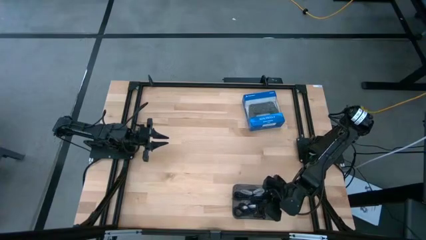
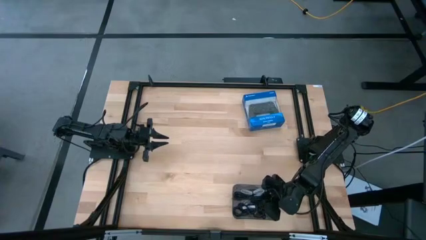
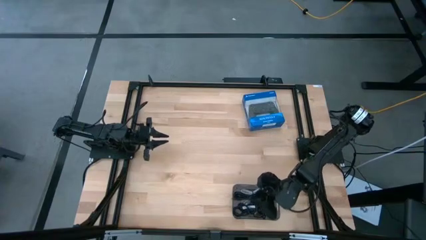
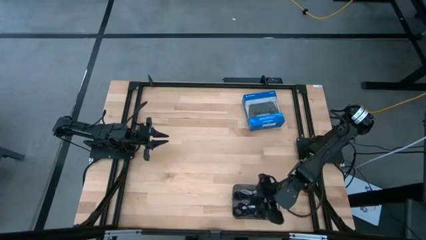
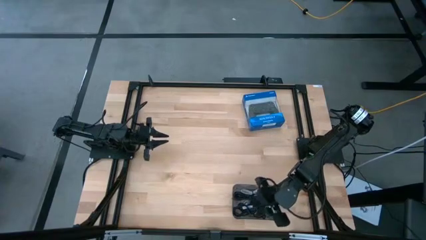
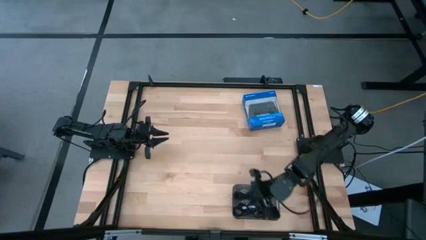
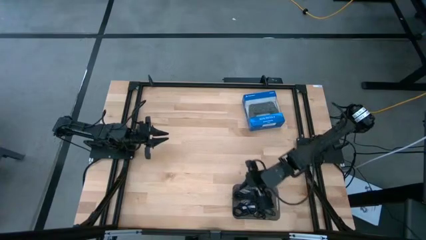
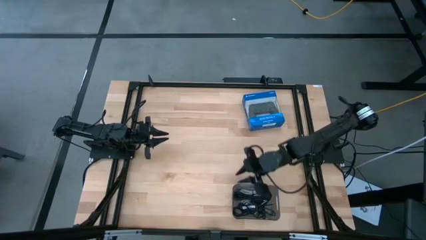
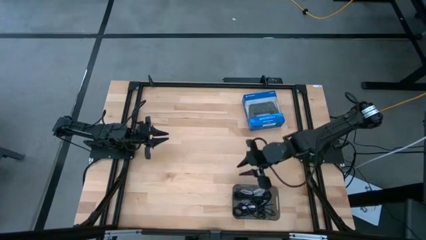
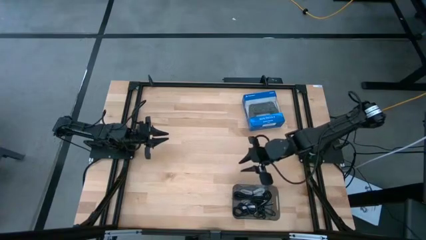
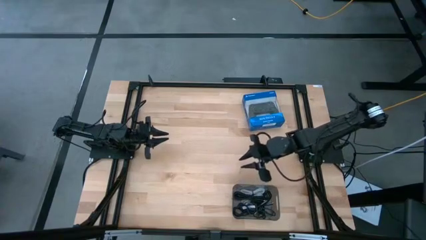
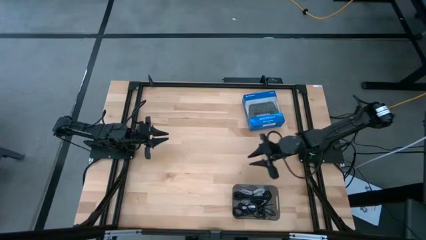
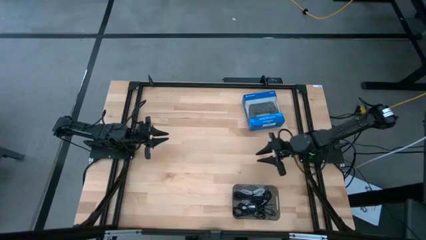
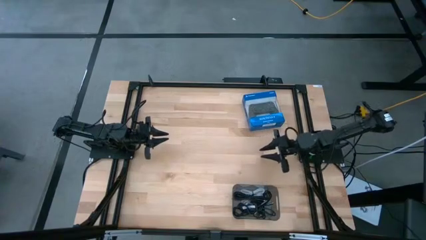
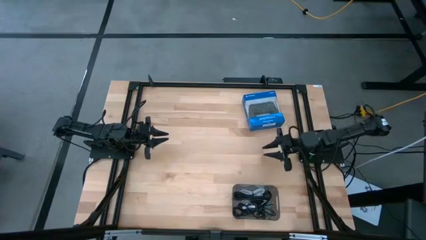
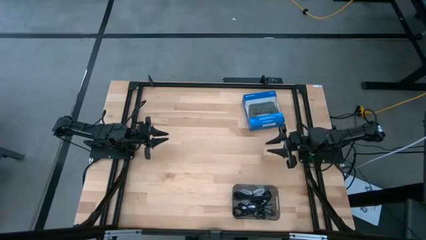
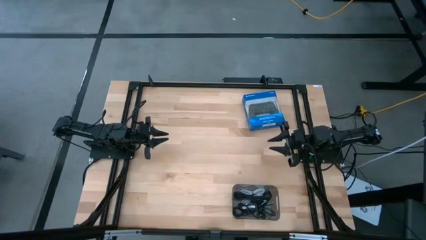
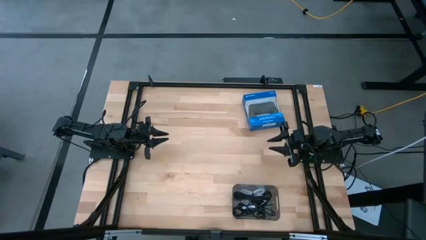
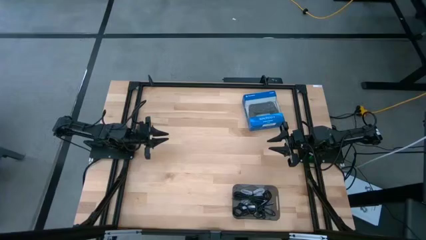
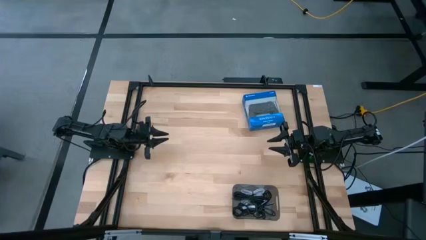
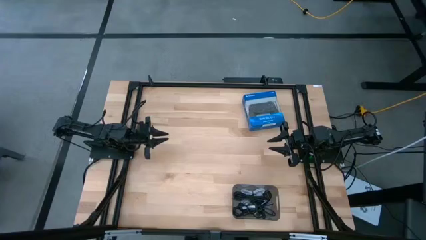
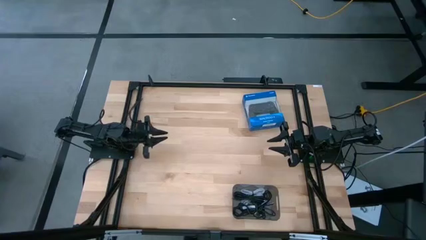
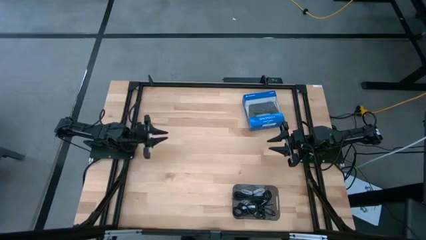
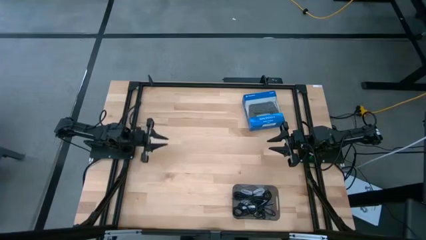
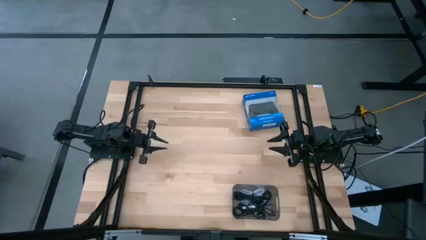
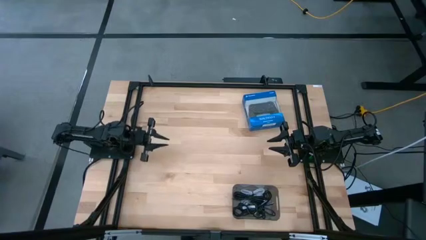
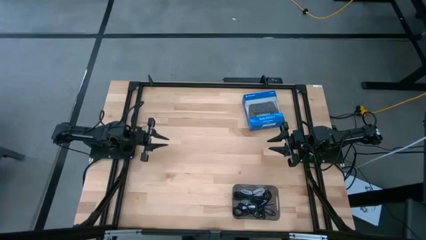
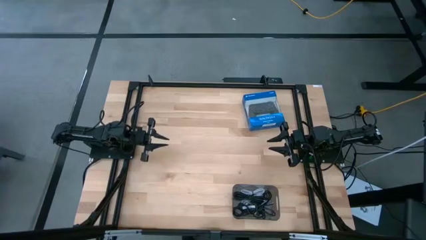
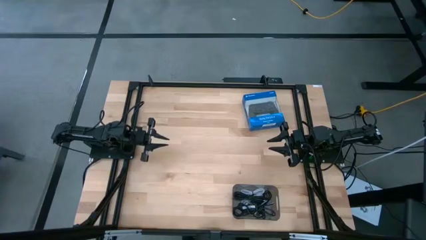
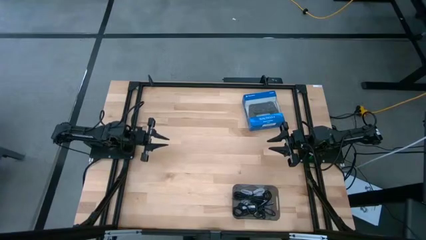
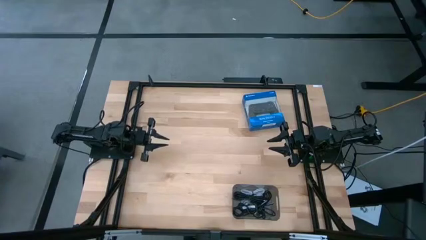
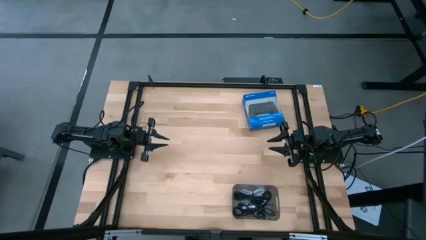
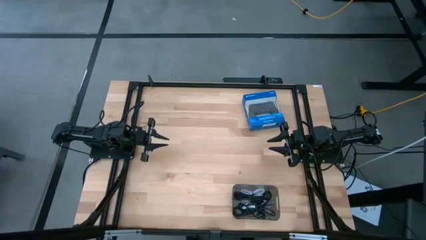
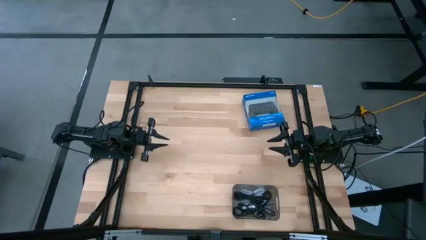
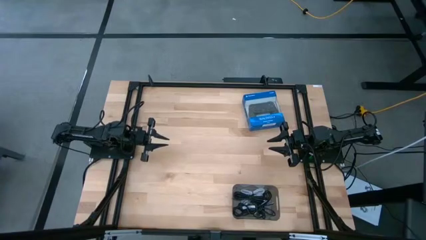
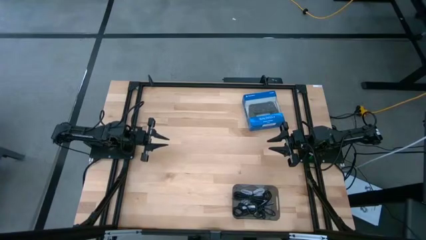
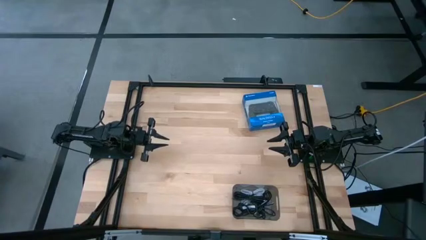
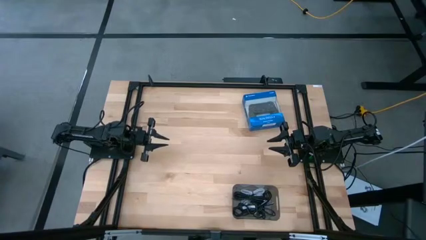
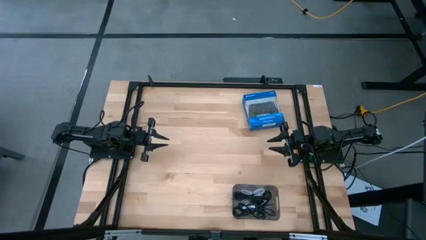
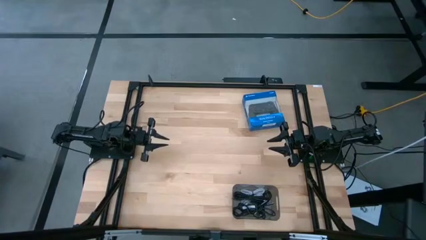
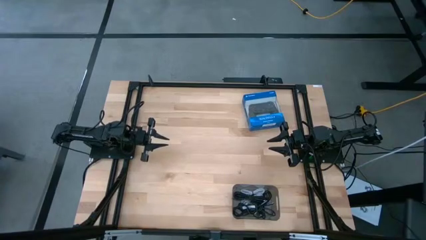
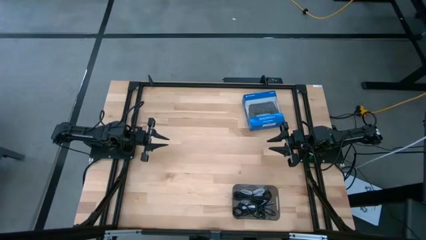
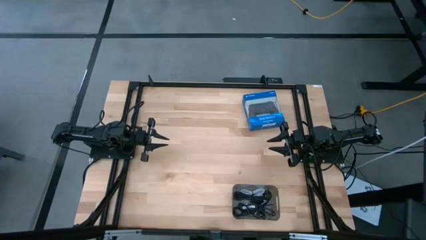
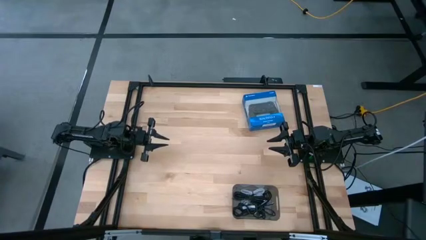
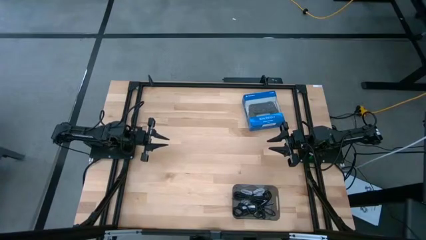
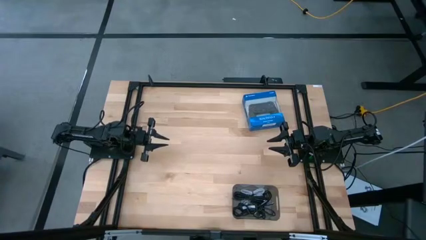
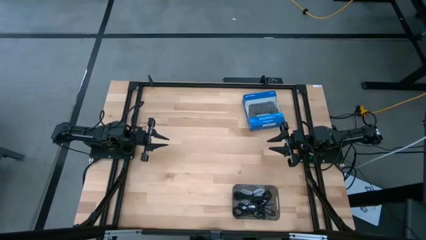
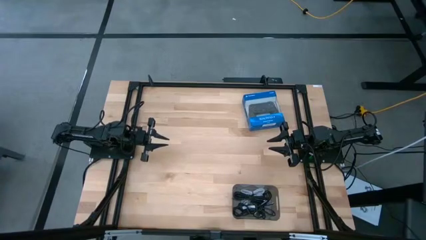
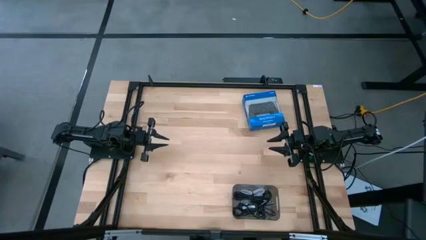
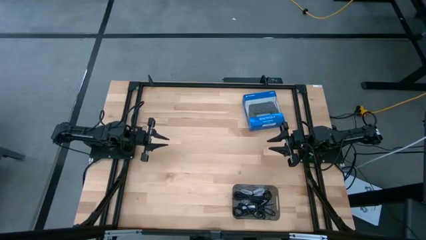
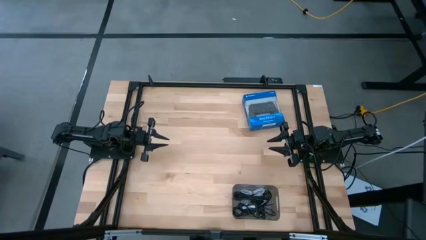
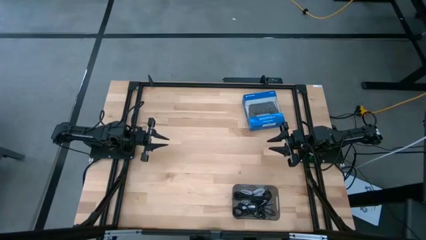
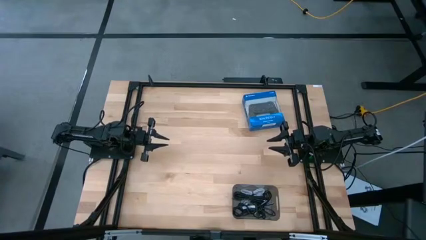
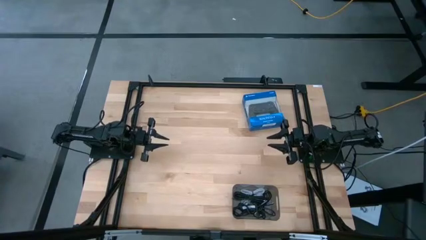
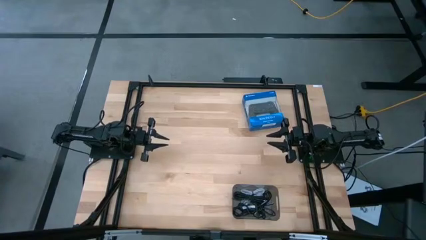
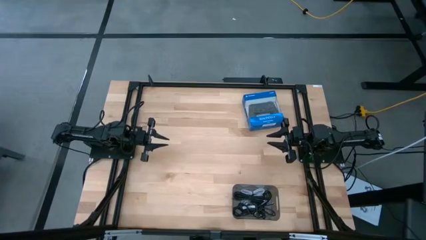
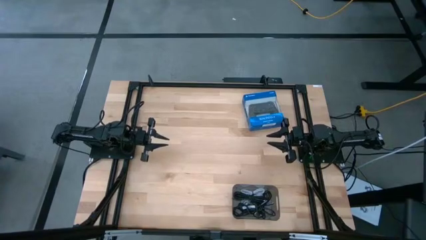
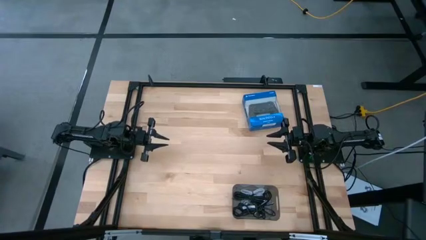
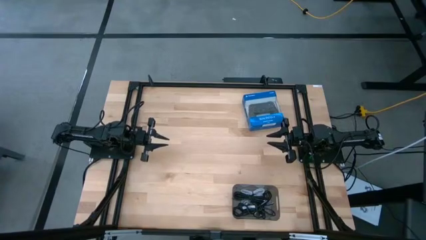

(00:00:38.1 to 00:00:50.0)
Task: Pick and place USB-C Cables
Return to Home Position

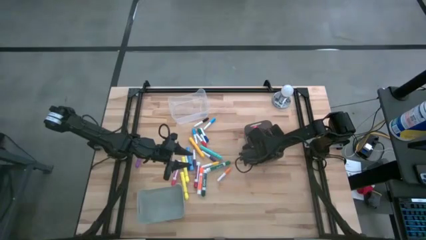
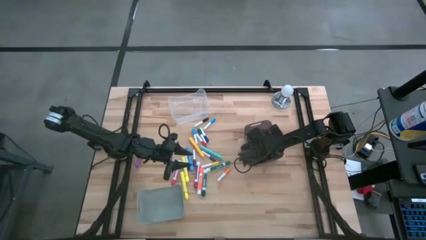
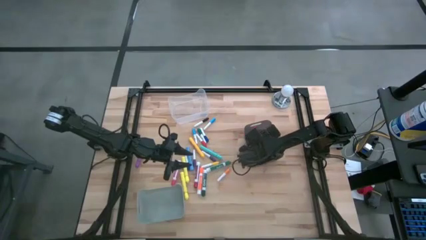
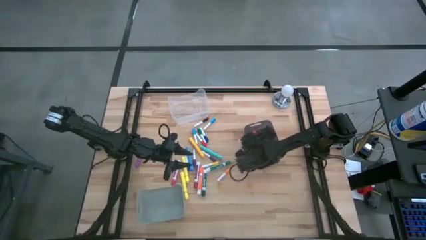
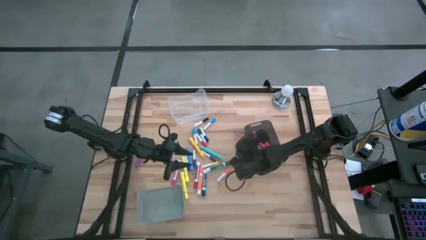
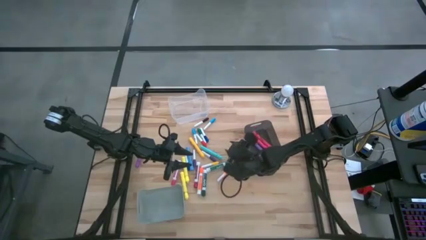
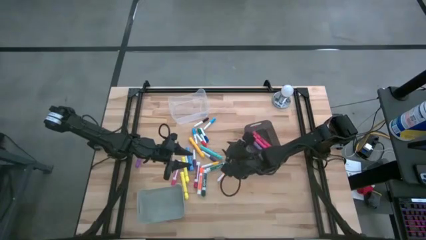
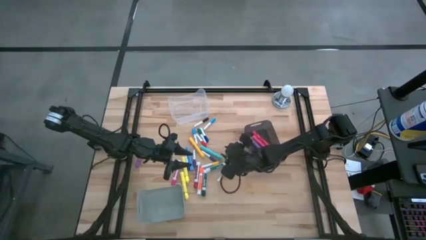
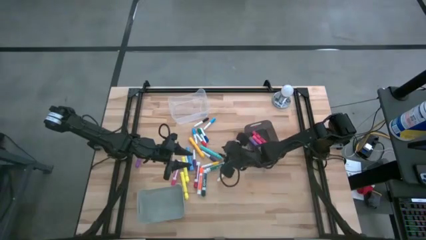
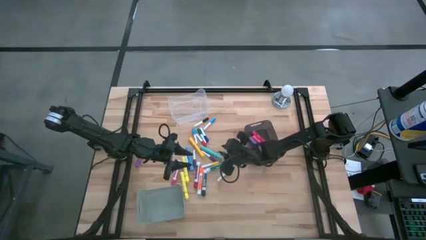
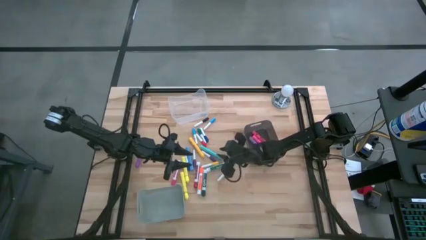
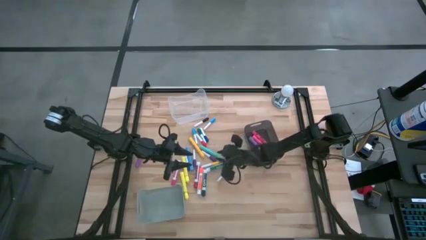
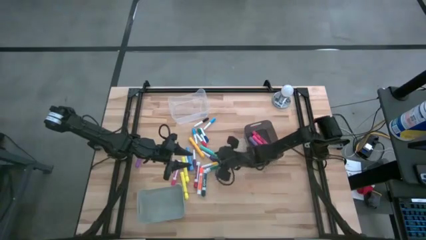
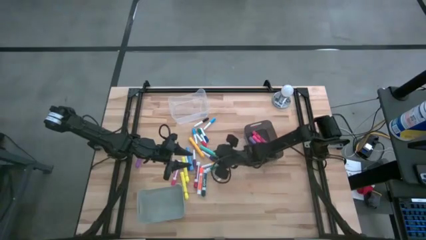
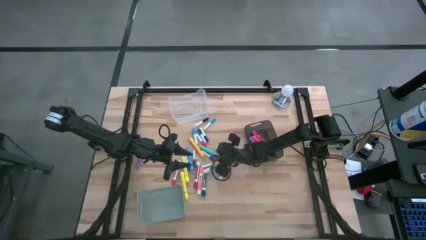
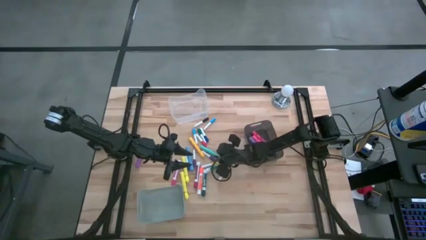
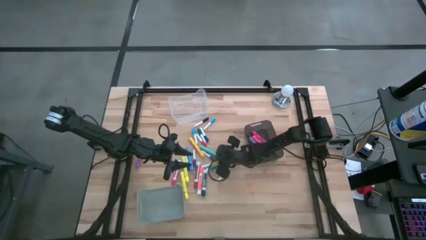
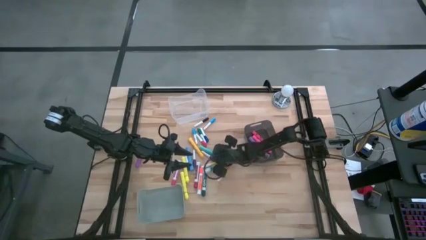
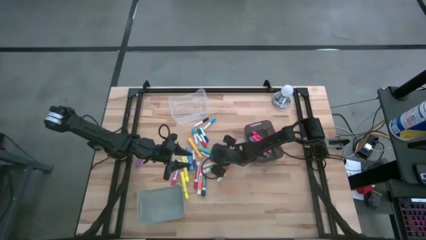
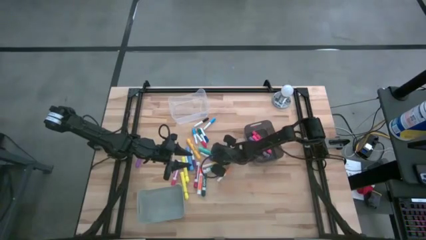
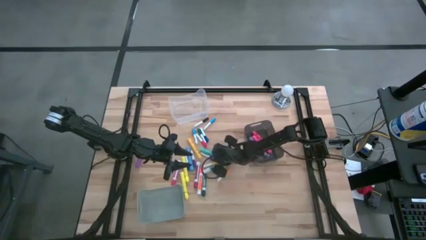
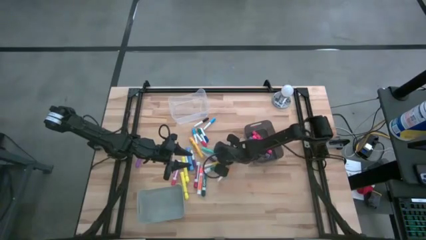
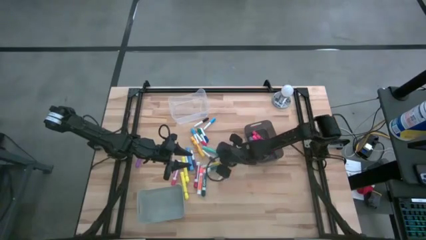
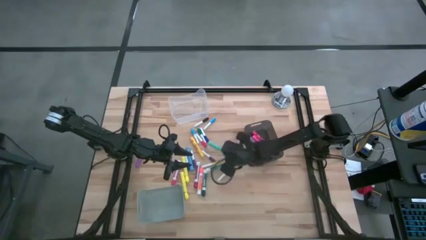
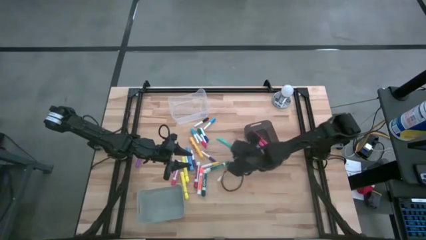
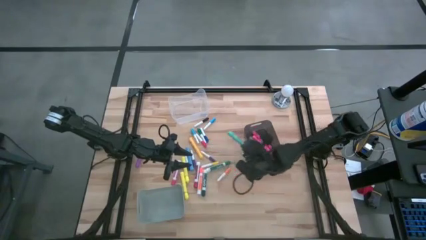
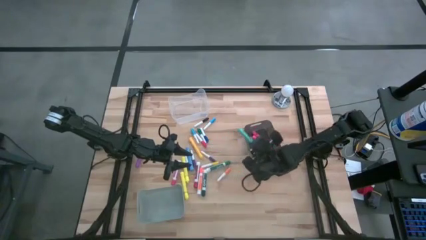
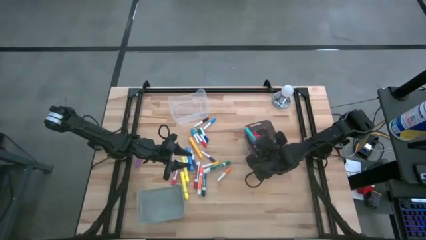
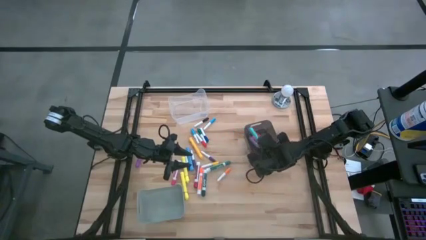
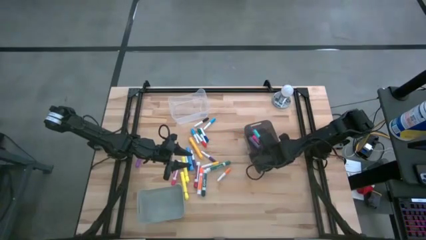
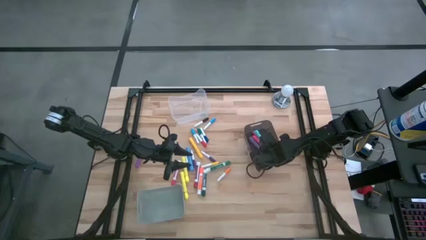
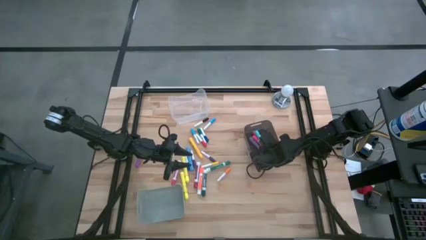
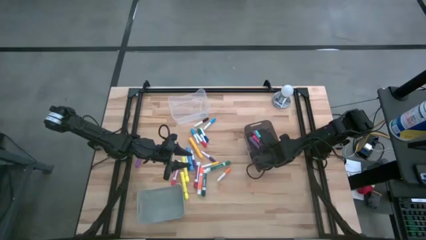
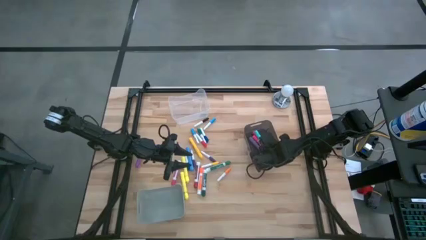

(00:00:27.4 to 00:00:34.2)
Task: Pick & Place Markers
Put the light green highlighter pen into the black bin
